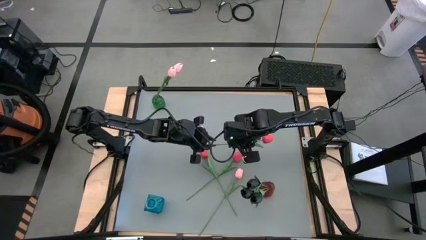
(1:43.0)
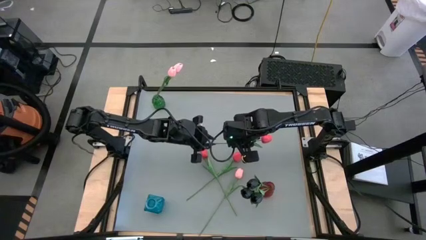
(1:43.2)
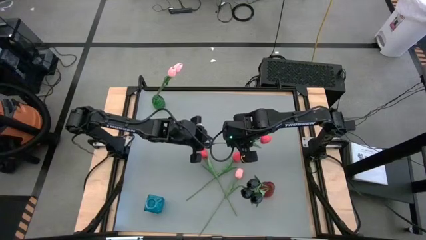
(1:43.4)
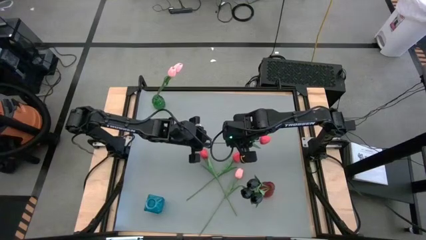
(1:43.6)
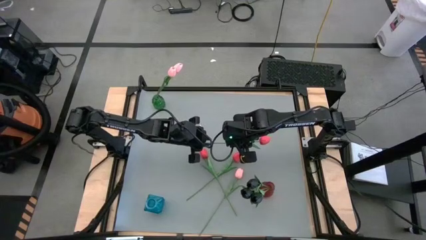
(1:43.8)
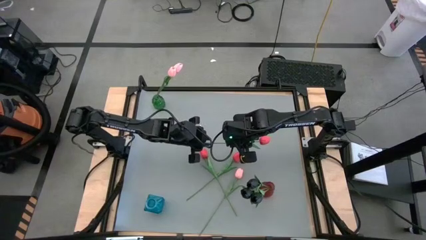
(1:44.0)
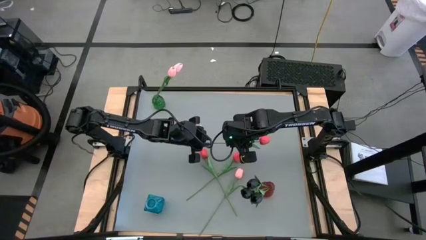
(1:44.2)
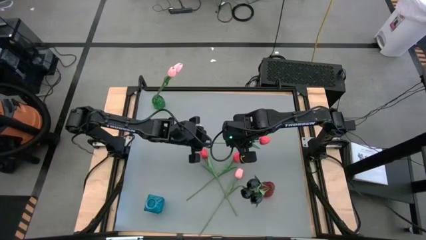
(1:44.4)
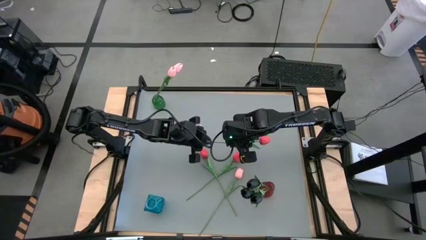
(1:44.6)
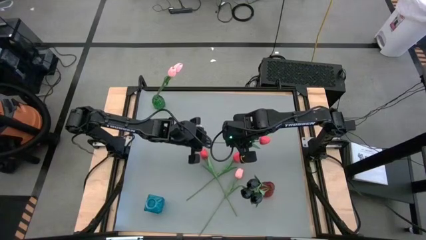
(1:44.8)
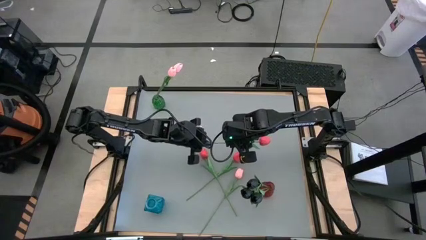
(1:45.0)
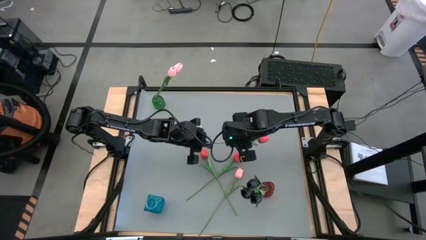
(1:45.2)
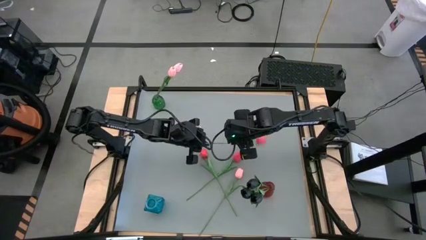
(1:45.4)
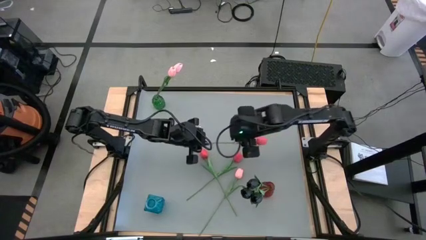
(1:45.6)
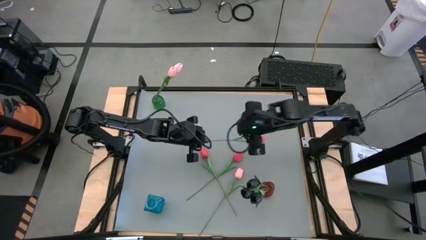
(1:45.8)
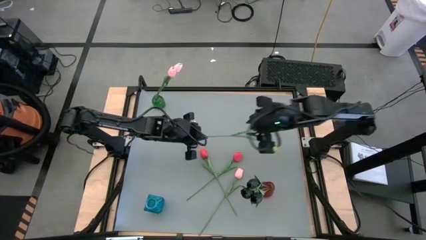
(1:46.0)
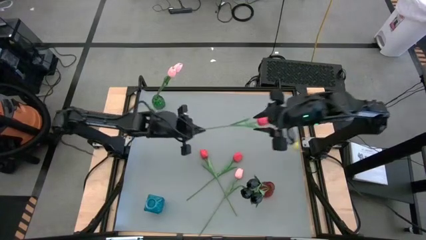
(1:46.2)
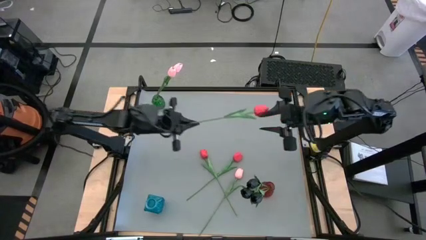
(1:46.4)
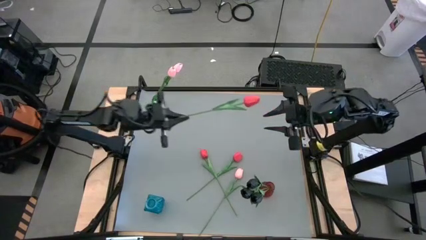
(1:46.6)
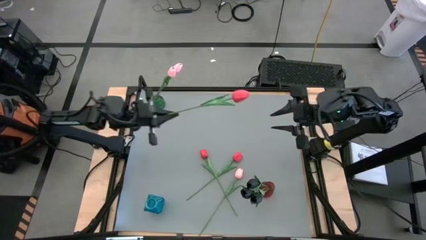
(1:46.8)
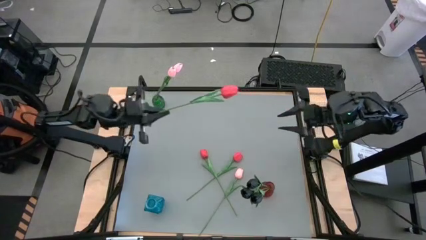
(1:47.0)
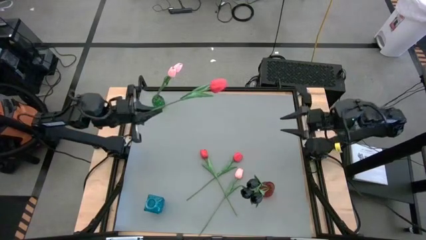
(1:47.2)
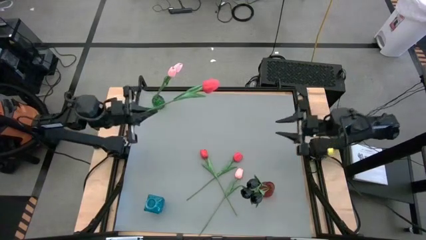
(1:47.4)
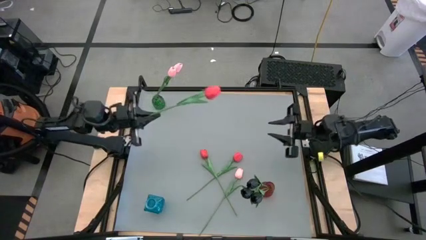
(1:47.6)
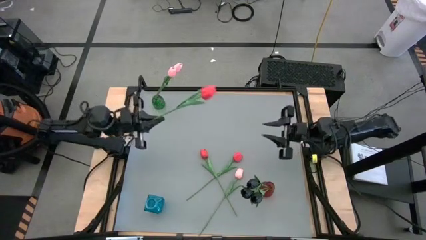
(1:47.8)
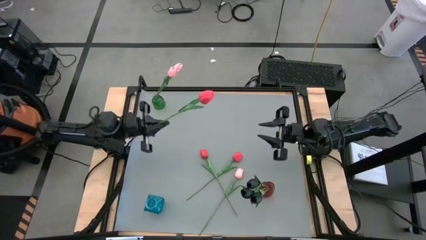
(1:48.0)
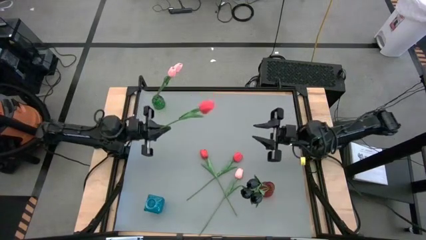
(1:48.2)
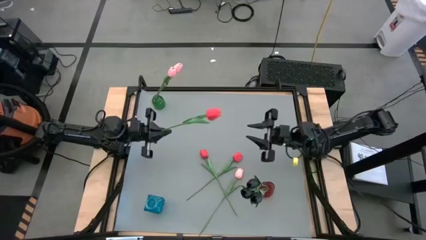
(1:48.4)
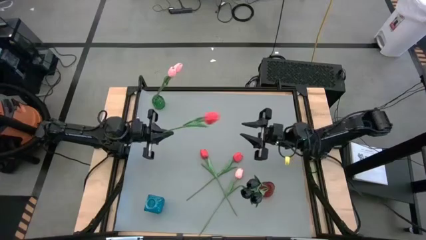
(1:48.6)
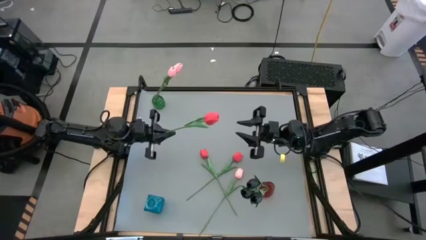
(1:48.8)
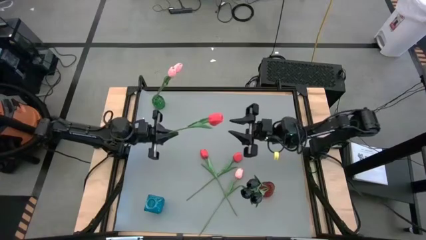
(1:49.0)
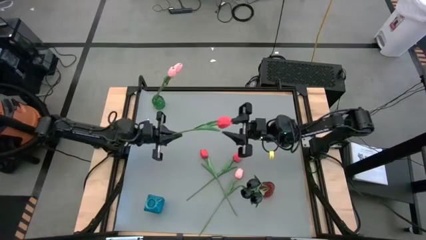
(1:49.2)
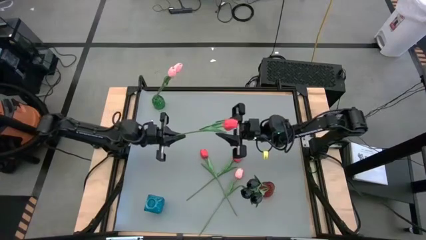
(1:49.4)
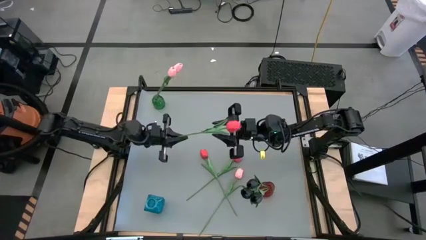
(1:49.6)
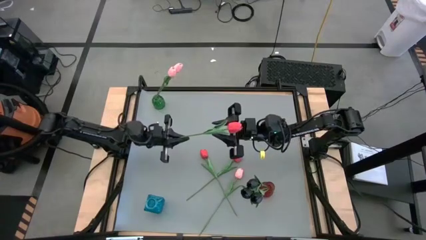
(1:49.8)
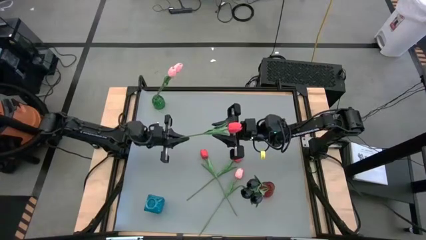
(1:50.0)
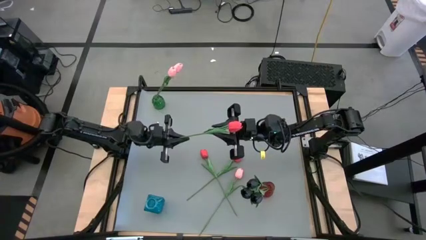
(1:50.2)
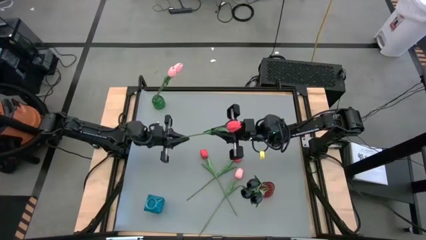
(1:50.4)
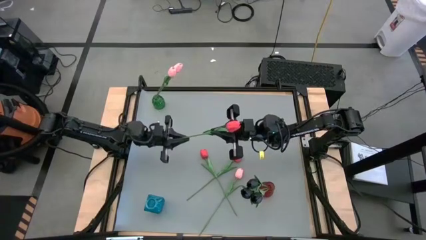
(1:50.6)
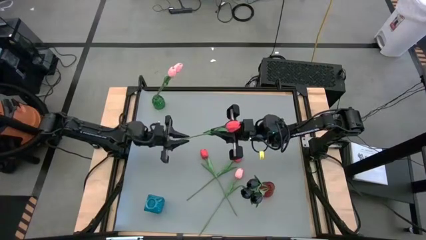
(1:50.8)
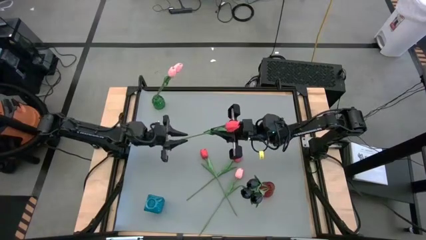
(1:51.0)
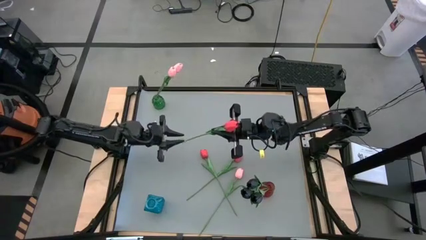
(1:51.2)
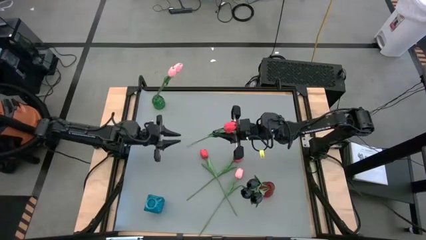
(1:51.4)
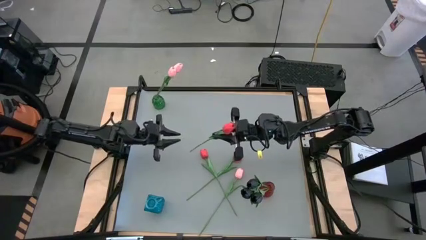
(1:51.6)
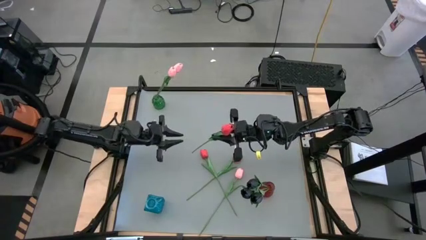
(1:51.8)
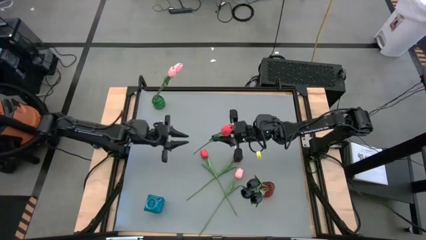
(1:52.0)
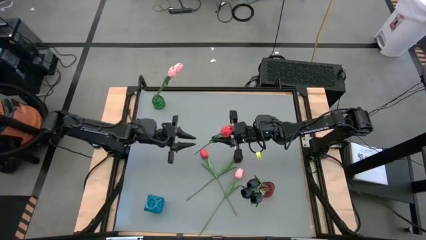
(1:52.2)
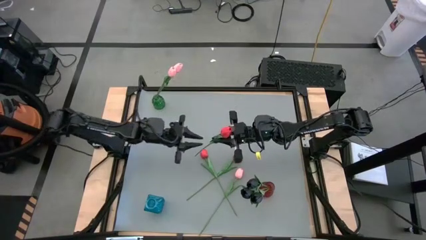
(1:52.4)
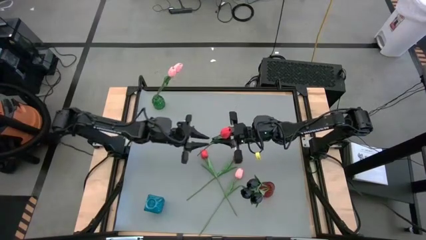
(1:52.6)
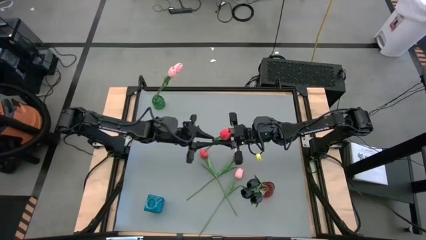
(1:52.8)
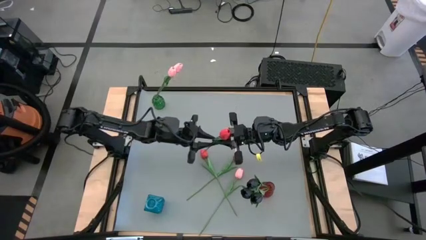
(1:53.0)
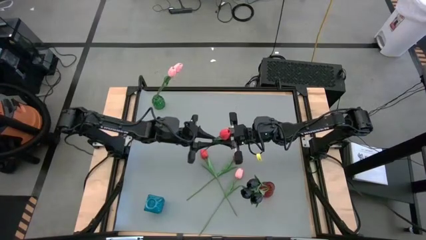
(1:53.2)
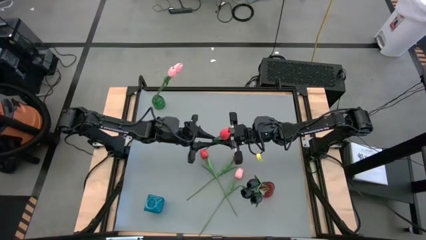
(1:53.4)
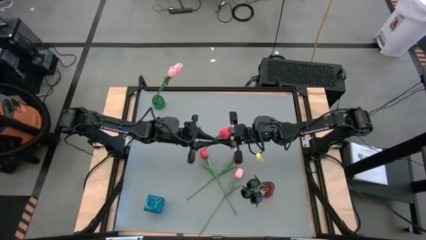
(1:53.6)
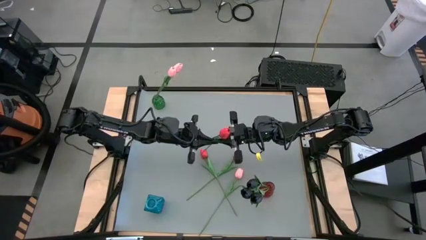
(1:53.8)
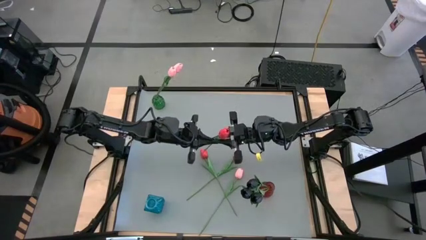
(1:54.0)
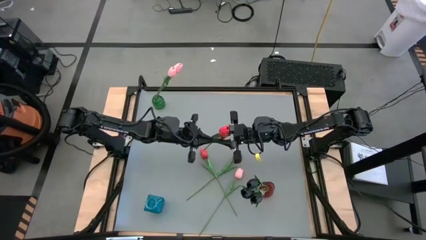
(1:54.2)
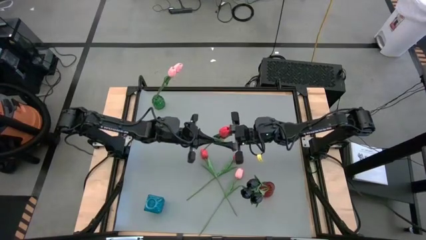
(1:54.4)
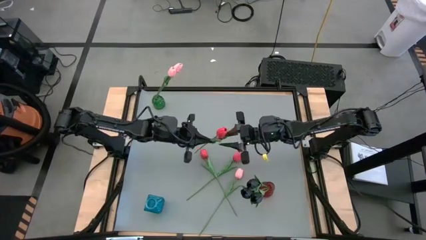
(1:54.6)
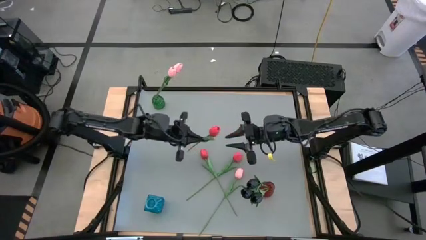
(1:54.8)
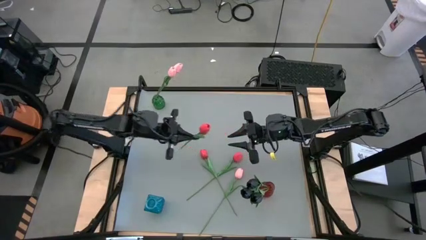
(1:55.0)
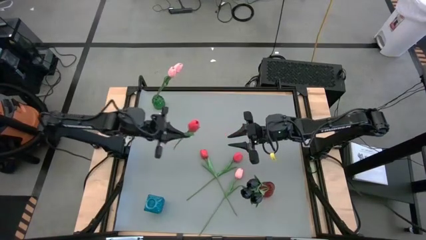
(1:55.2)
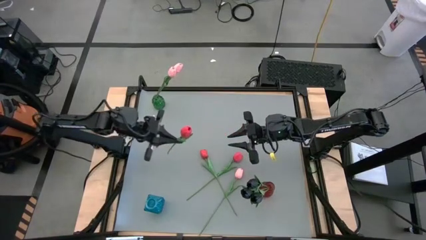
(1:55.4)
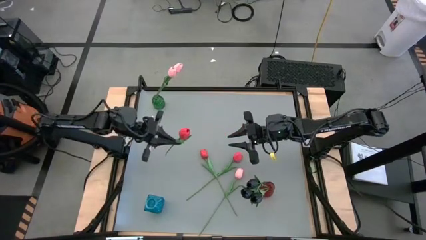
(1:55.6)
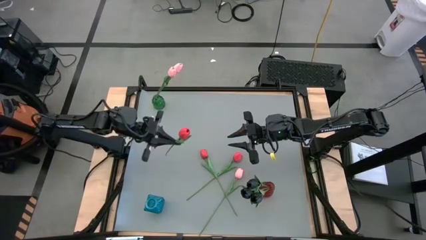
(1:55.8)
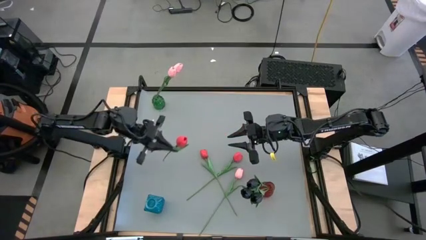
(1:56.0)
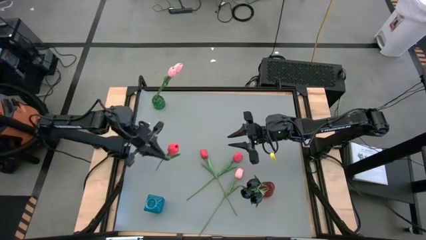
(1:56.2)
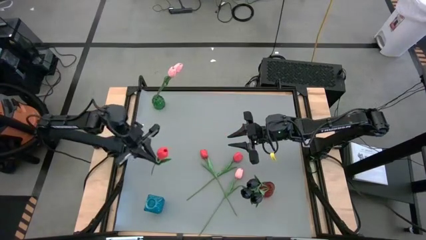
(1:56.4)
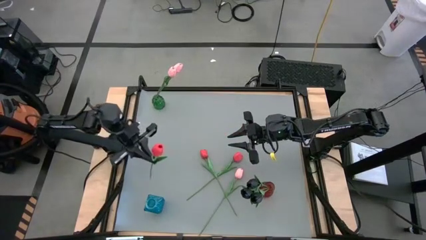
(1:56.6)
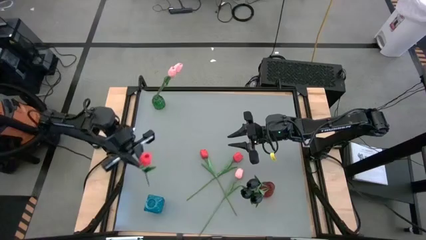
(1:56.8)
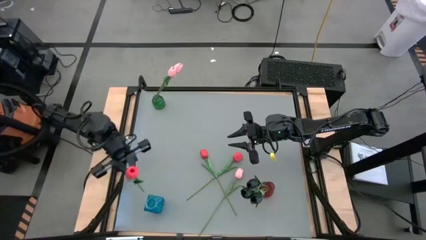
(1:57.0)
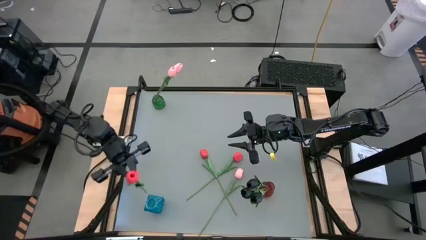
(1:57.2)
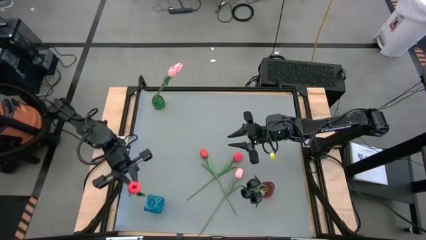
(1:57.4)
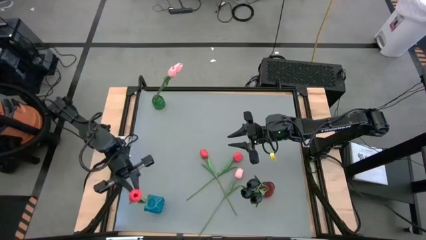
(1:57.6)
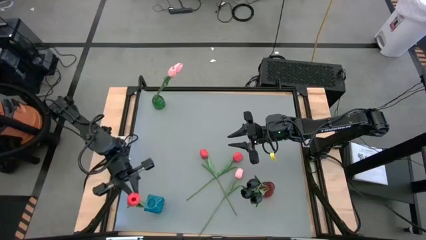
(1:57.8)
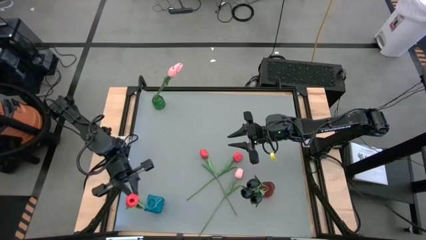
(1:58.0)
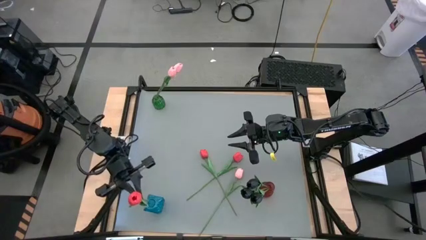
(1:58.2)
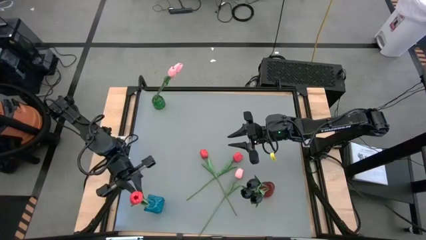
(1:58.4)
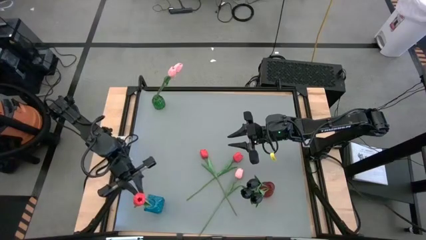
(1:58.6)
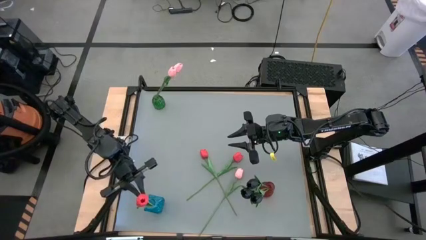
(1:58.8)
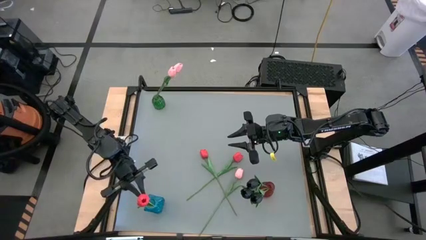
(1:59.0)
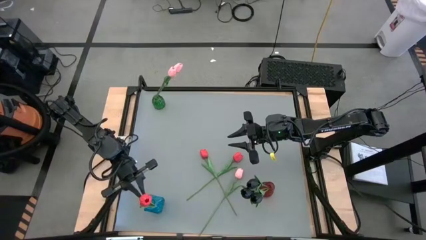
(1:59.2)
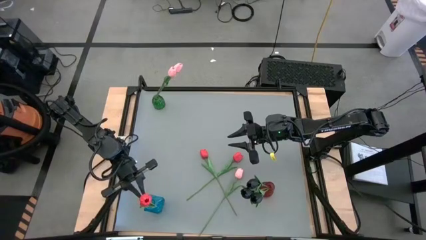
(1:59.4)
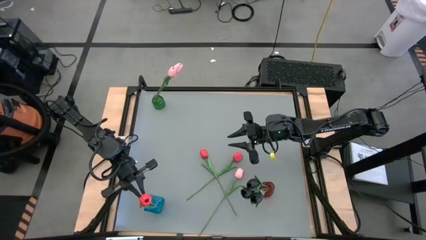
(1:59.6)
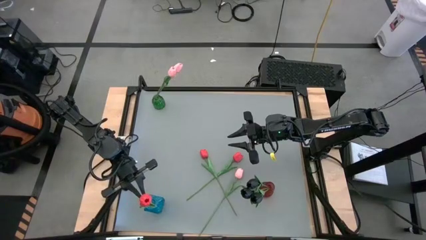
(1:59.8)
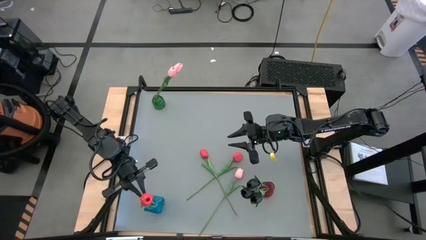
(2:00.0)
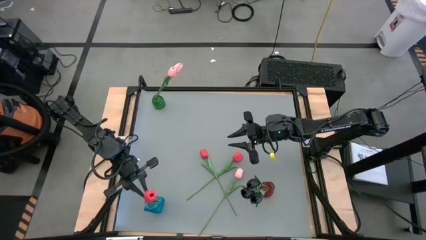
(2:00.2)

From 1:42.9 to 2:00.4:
Task: Sort flowers into vase by color
Put the right red flower into the blue vase
